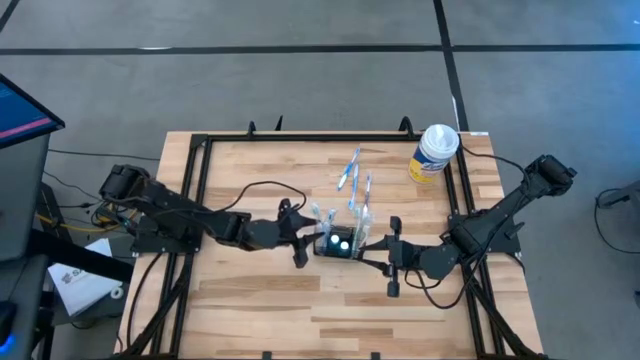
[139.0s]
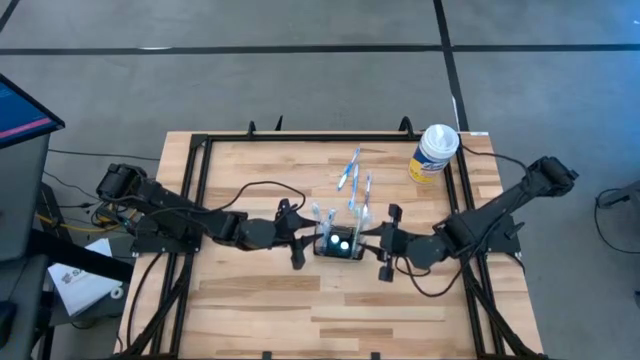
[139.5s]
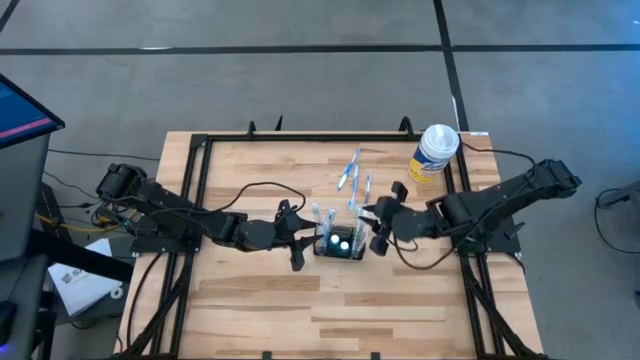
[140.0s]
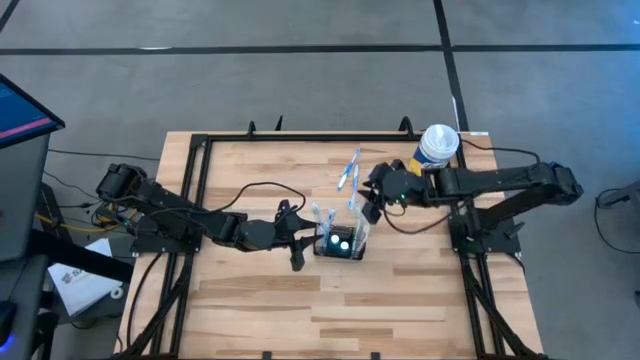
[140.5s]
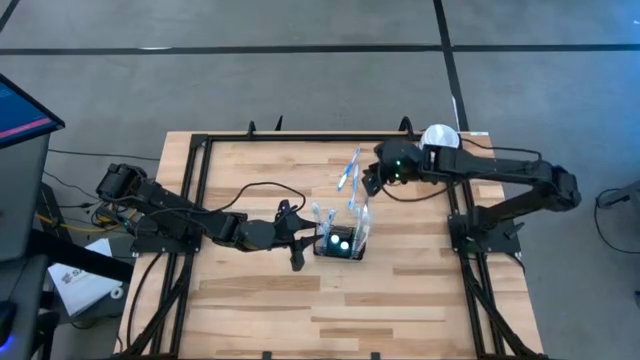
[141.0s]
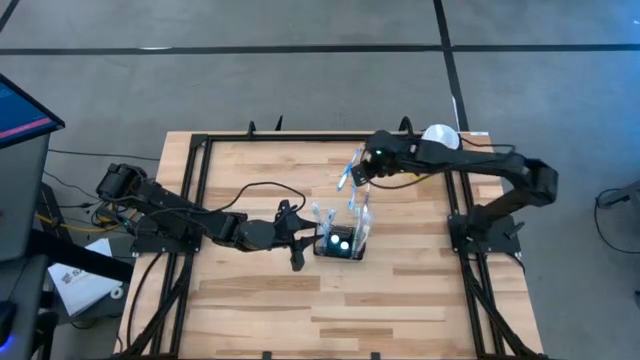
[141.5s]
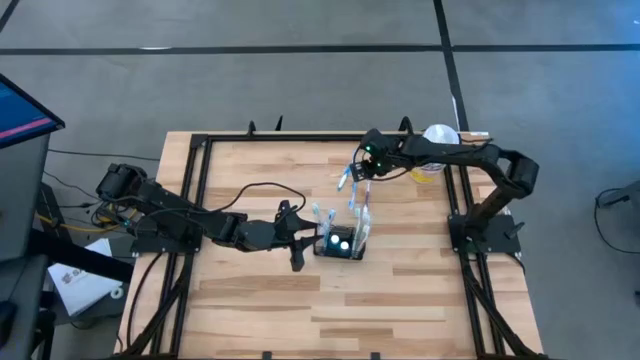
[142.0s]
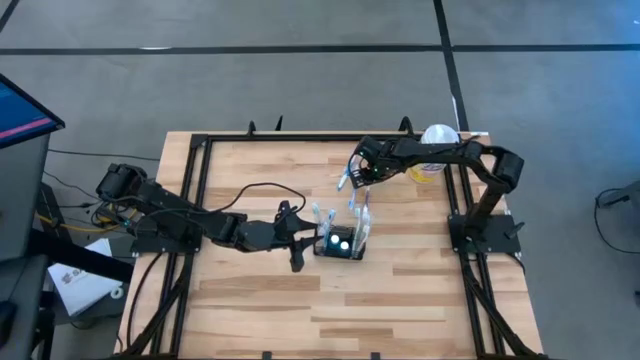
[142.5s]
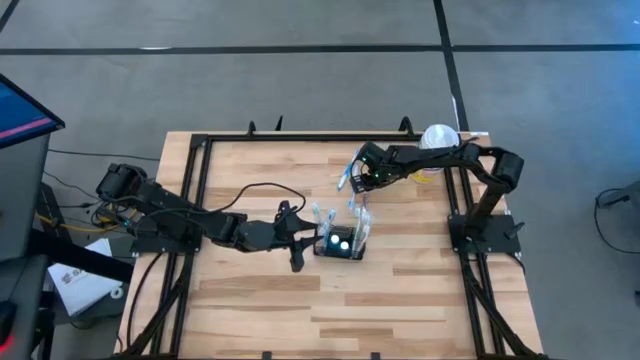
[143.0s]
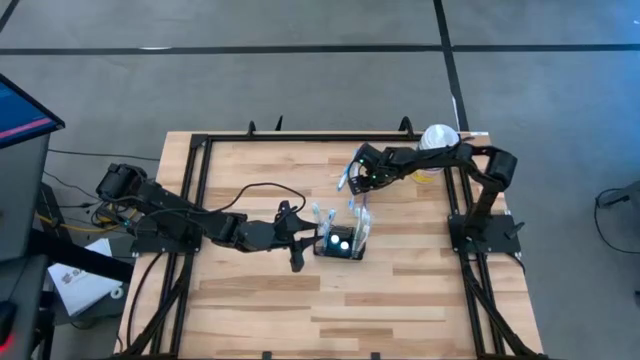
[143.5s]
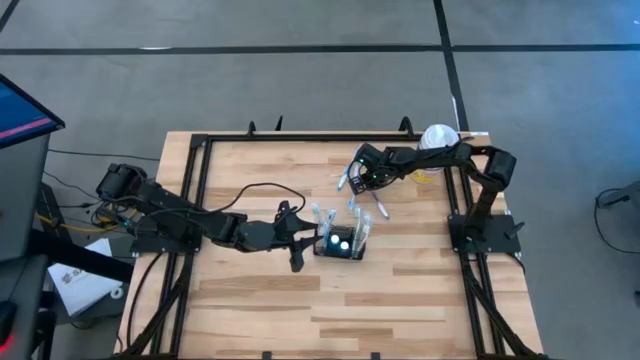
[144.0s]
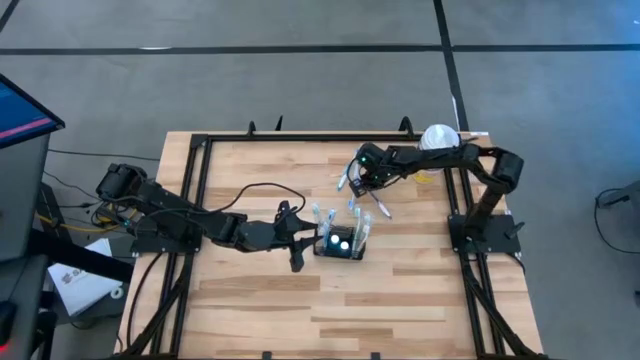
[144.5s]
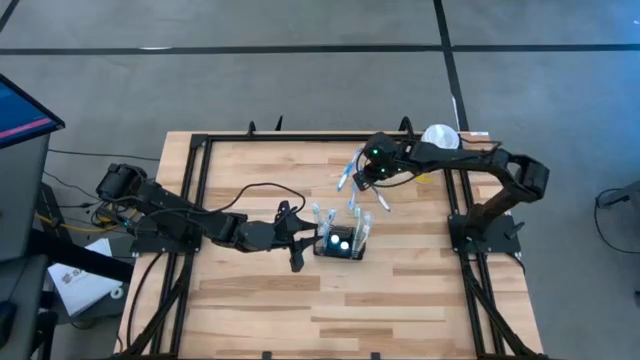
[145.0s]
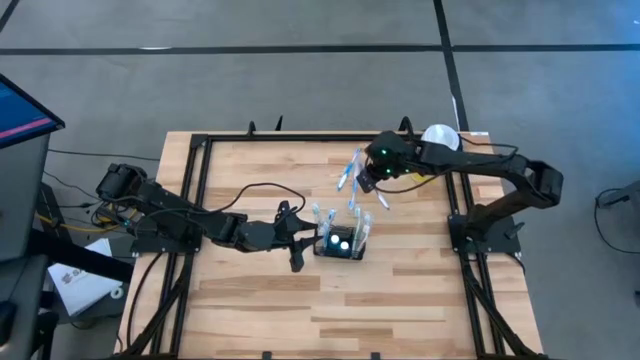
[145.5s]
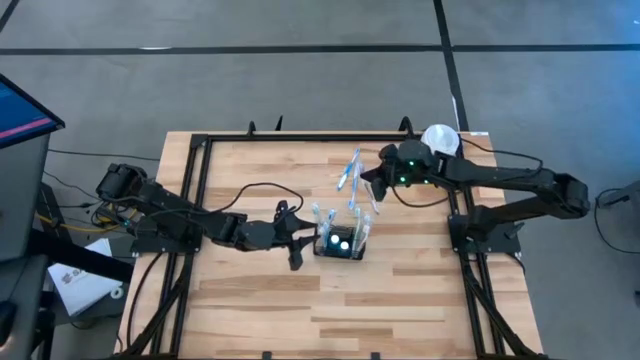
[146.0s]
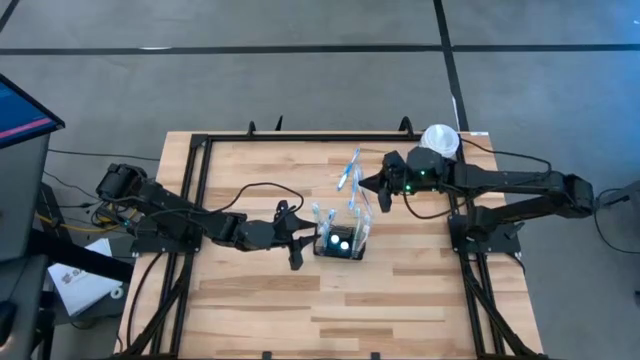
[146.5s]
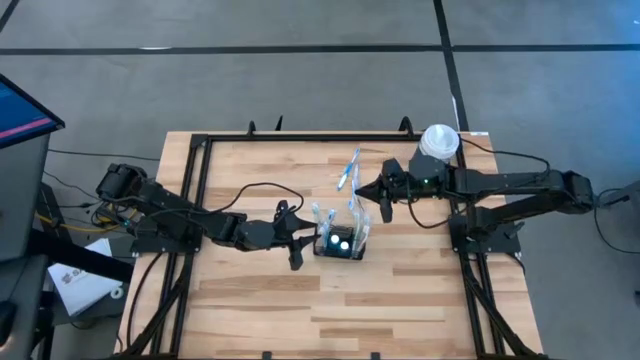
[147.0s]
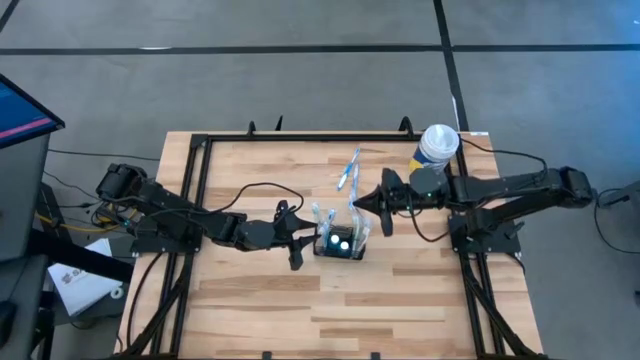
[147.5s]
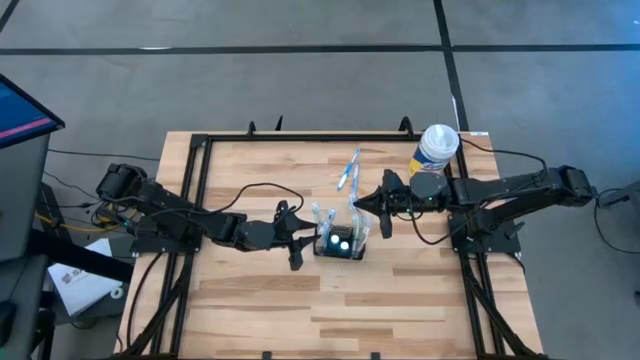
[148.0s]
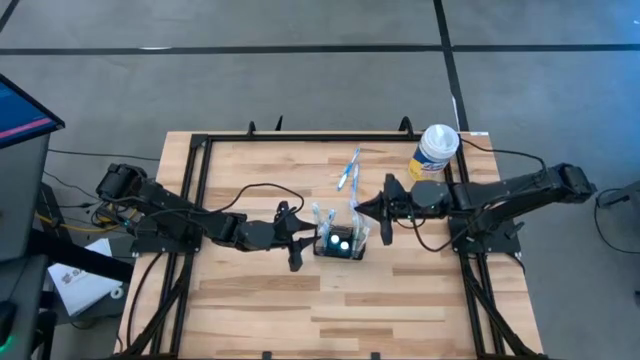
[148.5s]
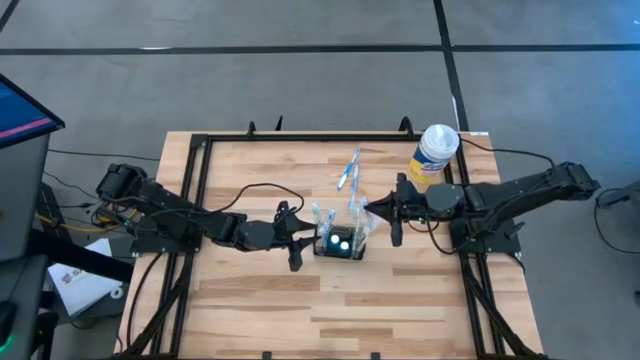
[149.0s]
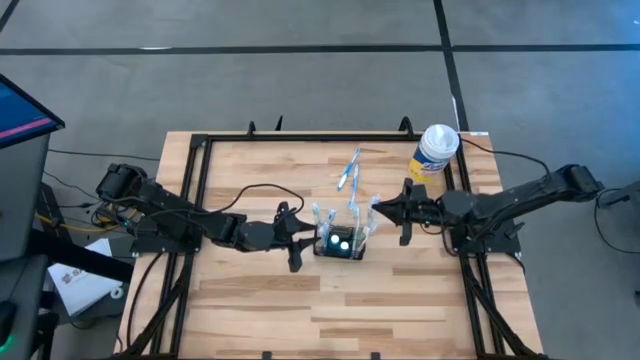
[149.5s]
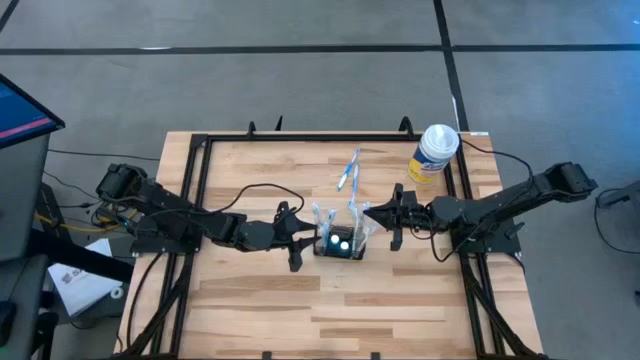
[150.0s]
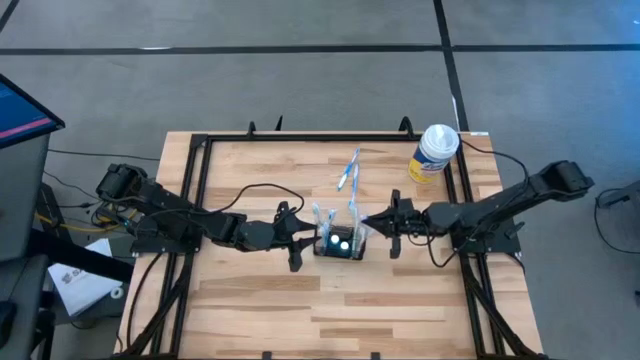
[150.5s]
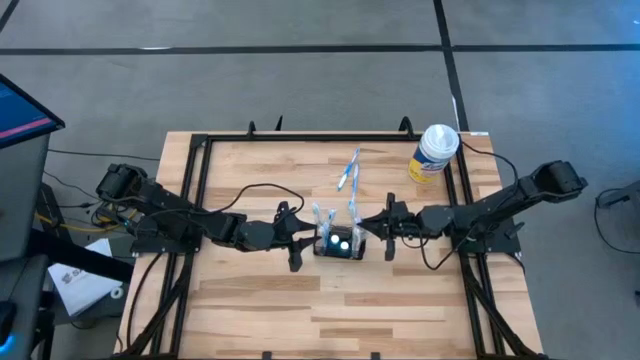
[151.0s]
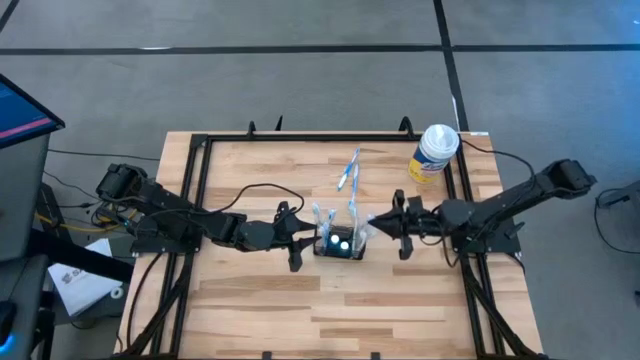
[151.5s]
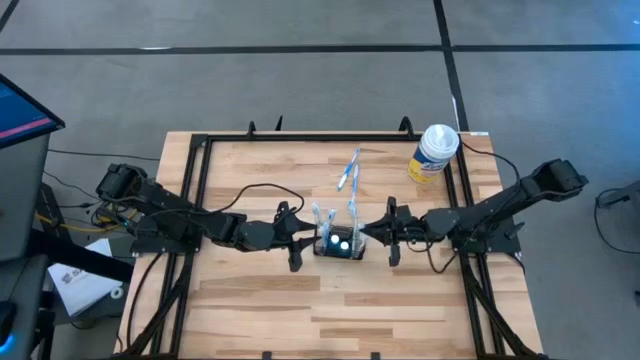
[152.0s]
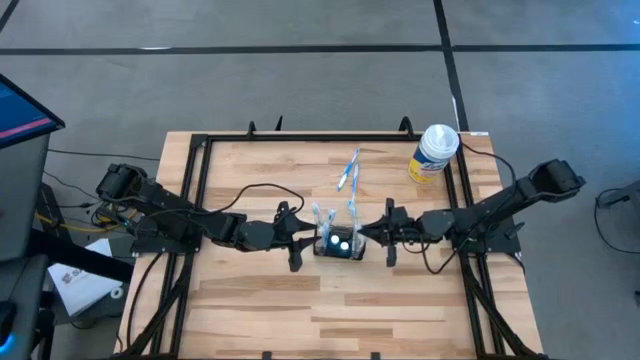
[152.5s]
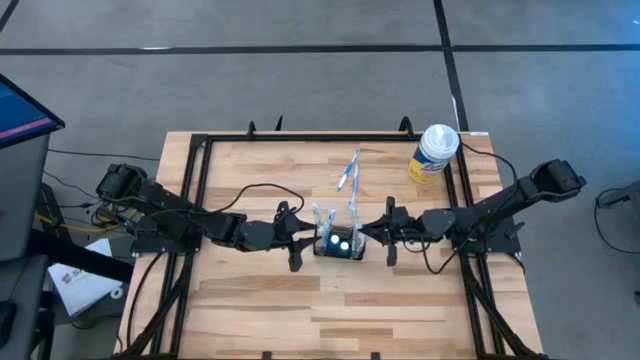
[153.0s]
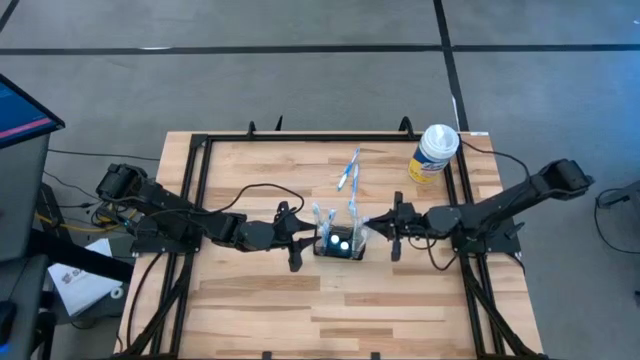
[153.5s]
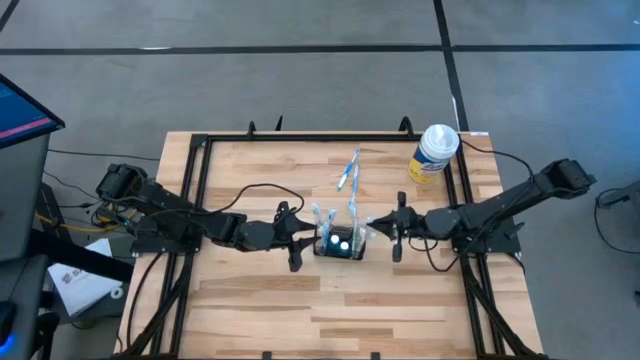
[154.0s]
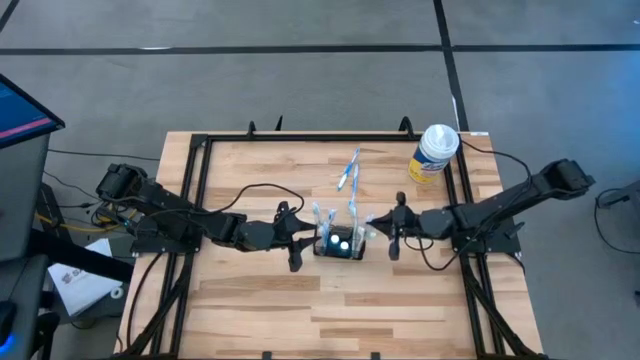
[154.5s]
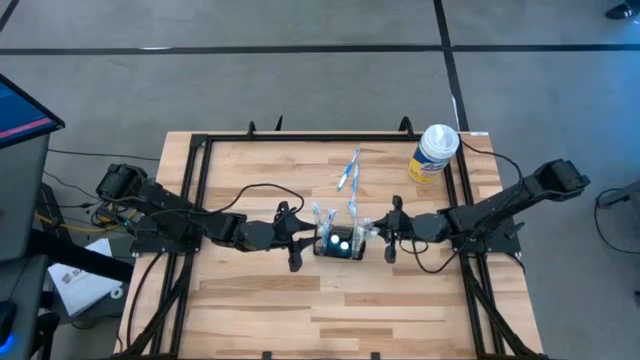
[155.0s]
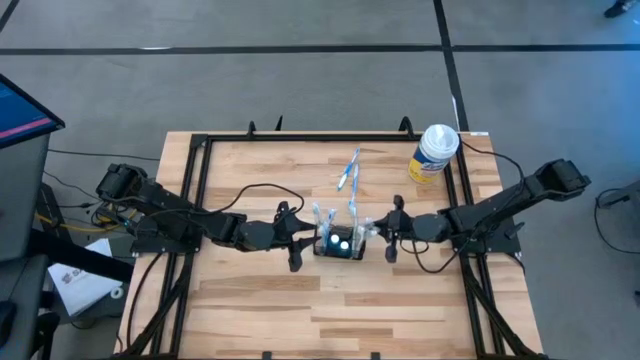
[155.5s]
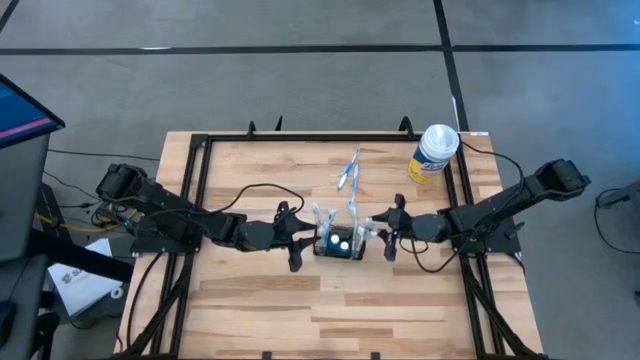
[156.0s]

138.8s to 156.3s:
Task: Pick & Place toothbrushing station
Put the violet toothbrush into the wire organizer
